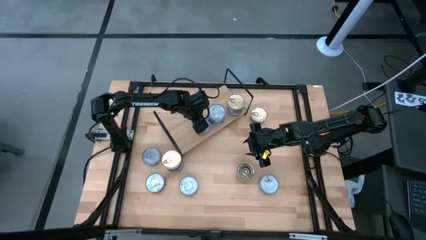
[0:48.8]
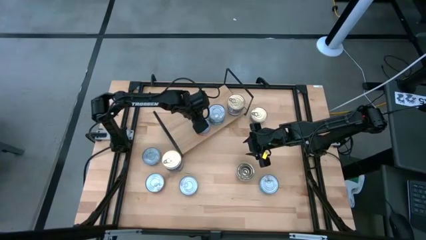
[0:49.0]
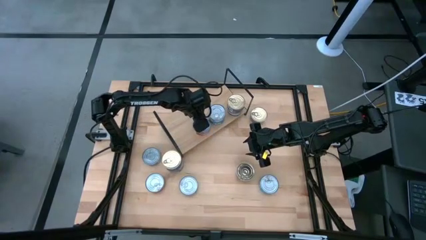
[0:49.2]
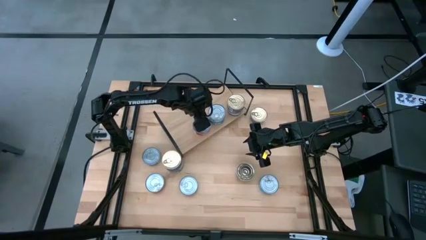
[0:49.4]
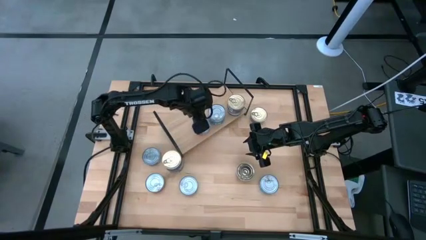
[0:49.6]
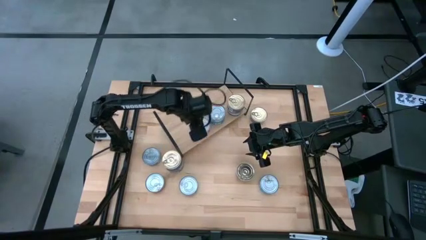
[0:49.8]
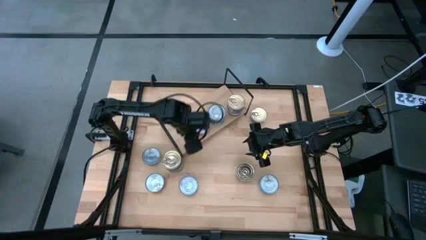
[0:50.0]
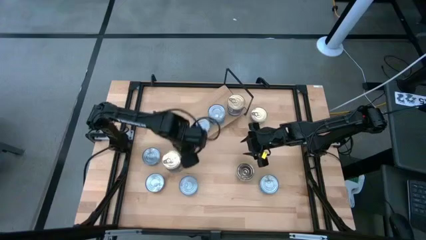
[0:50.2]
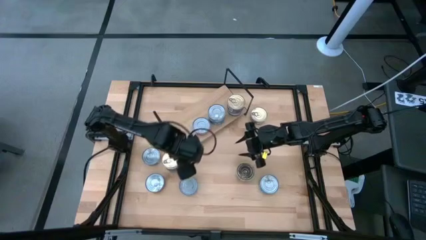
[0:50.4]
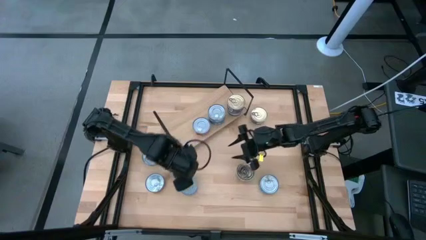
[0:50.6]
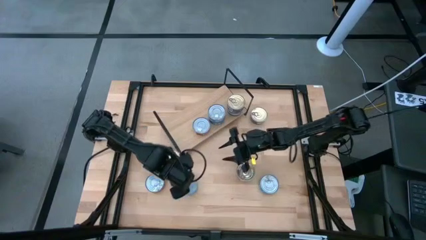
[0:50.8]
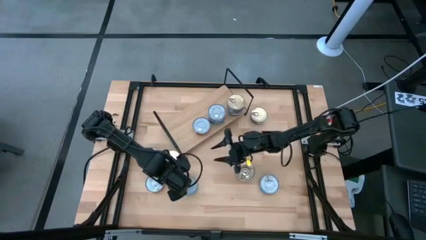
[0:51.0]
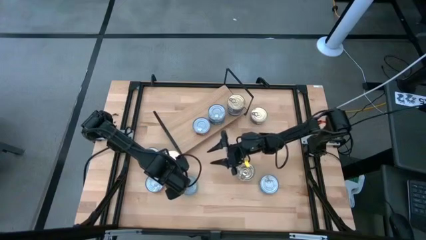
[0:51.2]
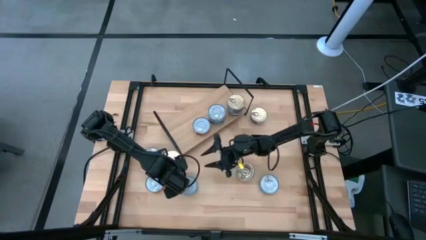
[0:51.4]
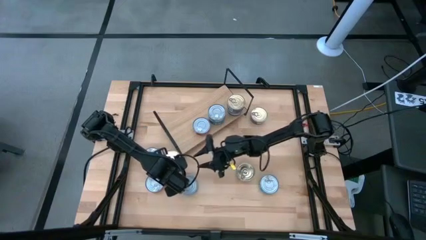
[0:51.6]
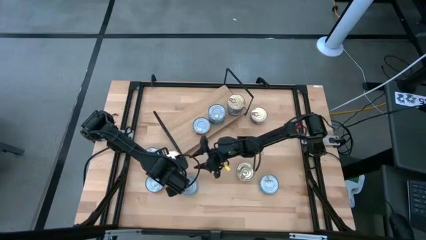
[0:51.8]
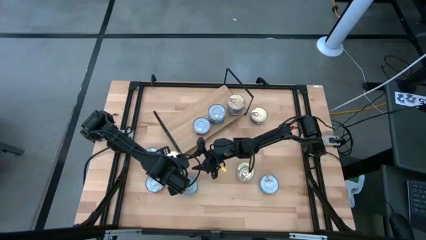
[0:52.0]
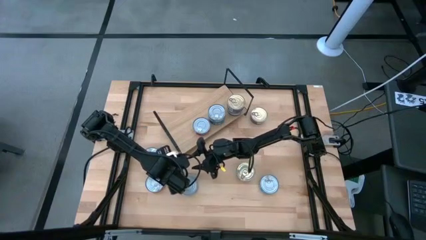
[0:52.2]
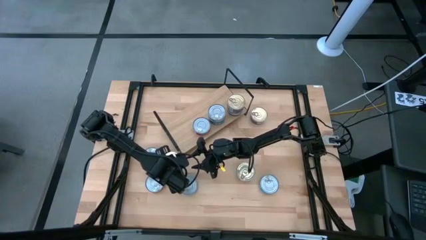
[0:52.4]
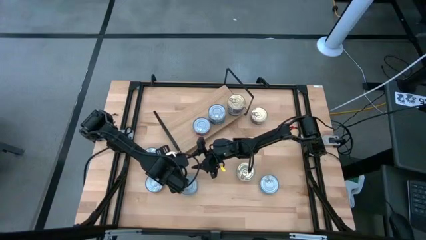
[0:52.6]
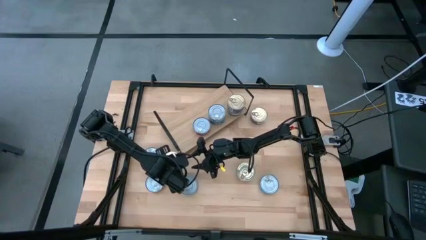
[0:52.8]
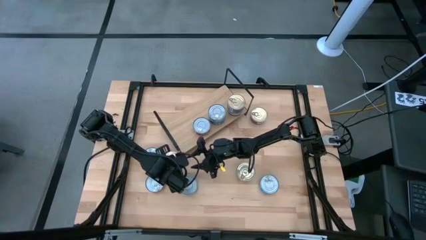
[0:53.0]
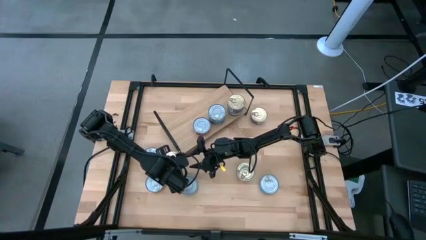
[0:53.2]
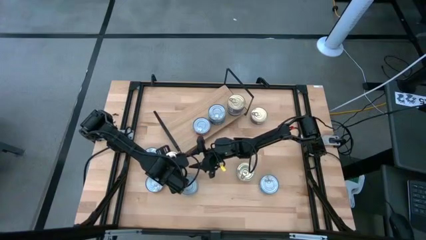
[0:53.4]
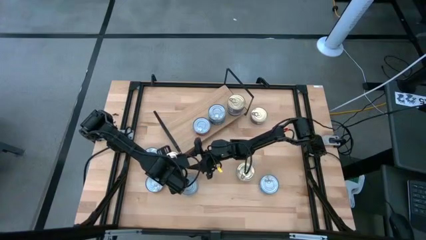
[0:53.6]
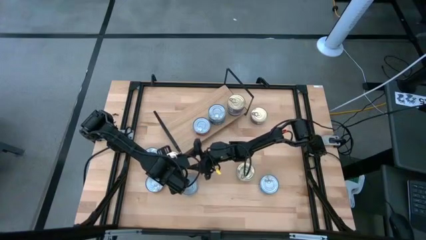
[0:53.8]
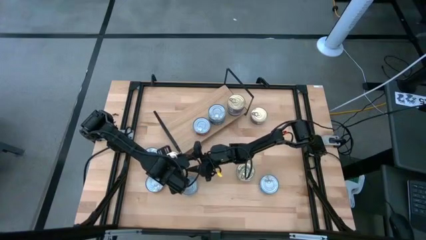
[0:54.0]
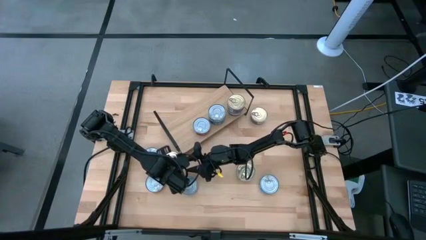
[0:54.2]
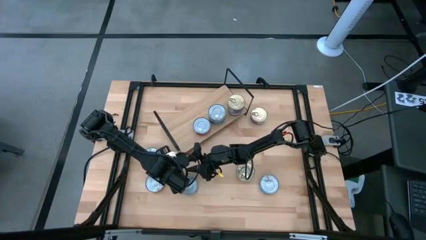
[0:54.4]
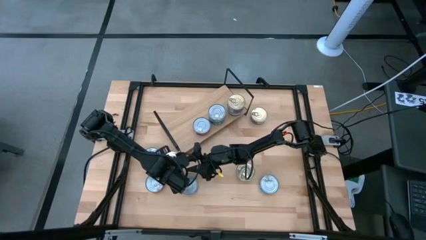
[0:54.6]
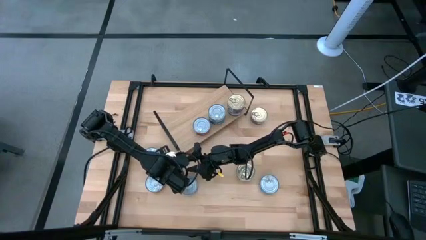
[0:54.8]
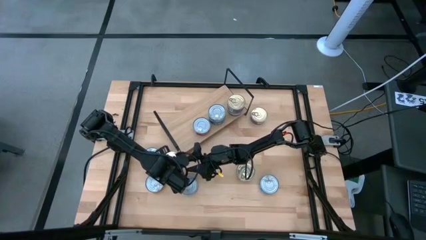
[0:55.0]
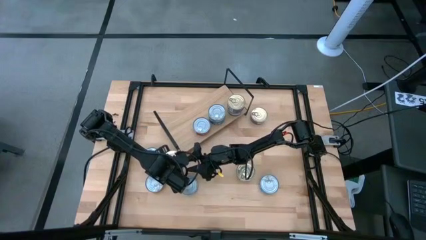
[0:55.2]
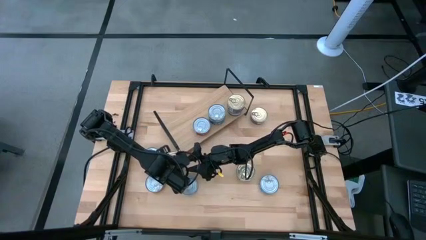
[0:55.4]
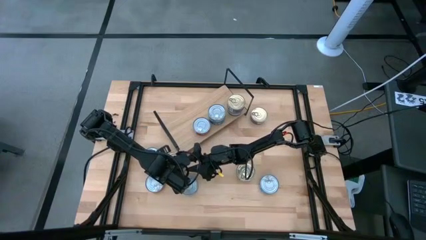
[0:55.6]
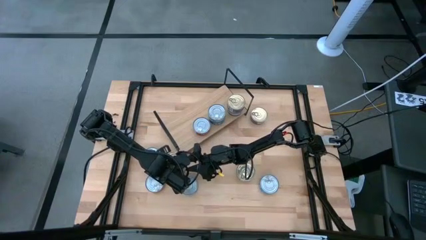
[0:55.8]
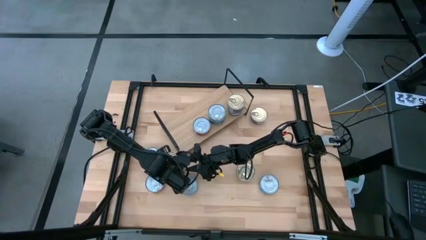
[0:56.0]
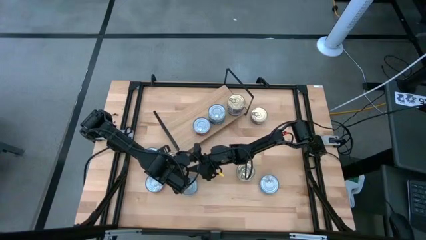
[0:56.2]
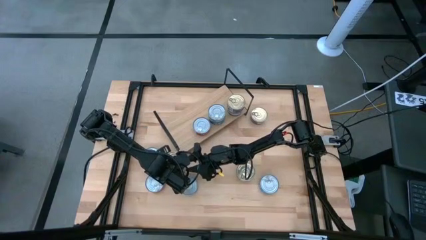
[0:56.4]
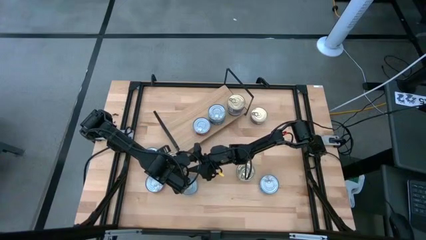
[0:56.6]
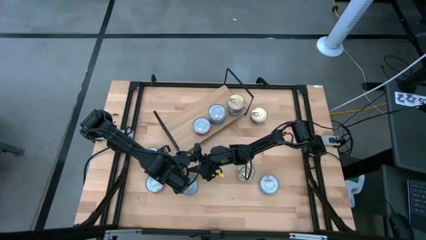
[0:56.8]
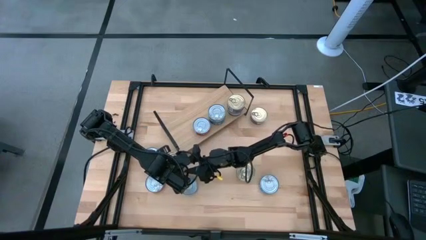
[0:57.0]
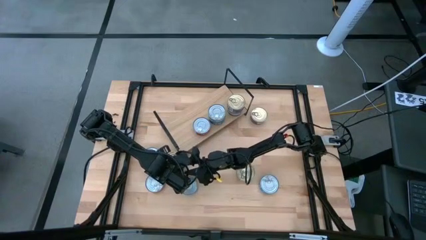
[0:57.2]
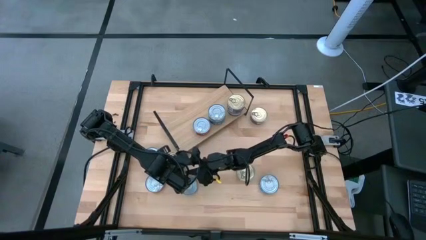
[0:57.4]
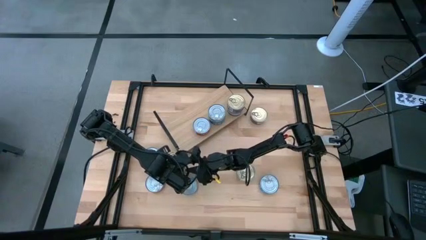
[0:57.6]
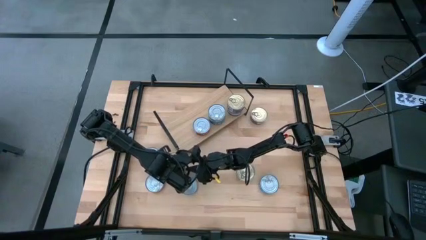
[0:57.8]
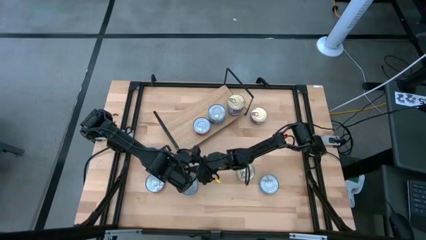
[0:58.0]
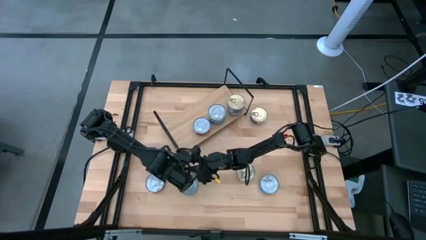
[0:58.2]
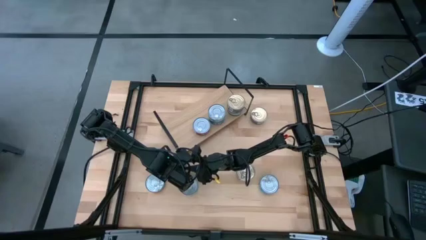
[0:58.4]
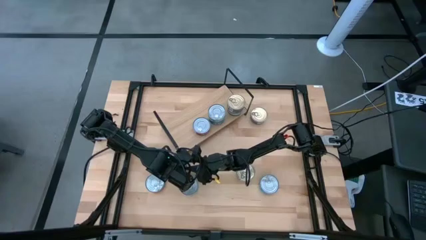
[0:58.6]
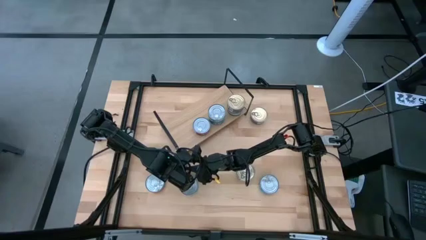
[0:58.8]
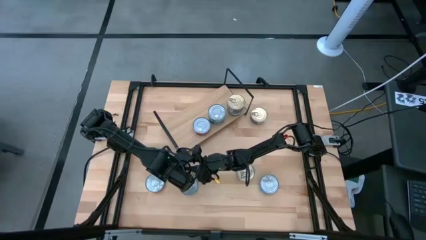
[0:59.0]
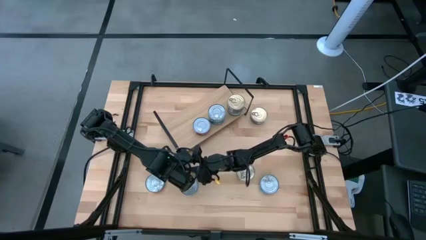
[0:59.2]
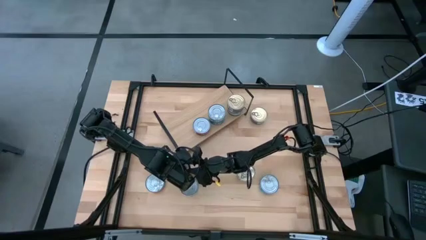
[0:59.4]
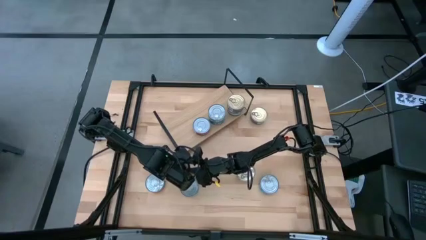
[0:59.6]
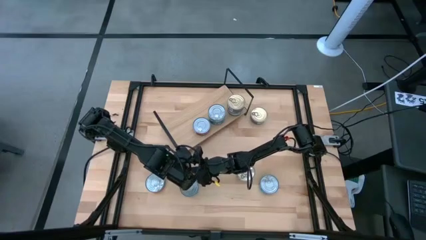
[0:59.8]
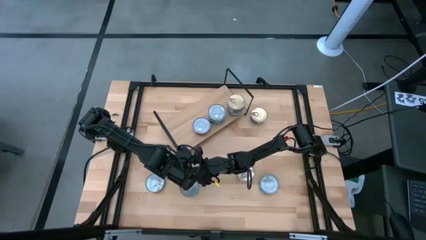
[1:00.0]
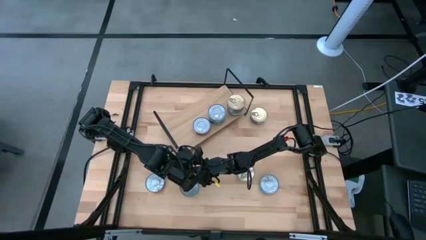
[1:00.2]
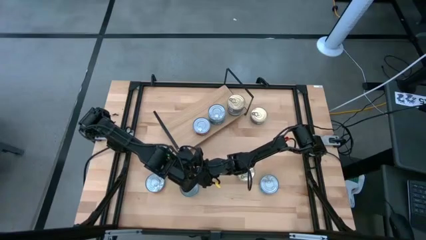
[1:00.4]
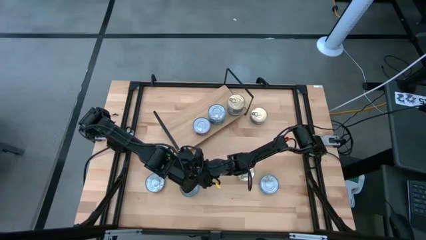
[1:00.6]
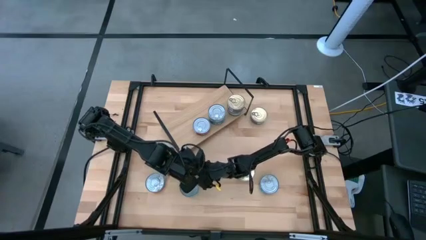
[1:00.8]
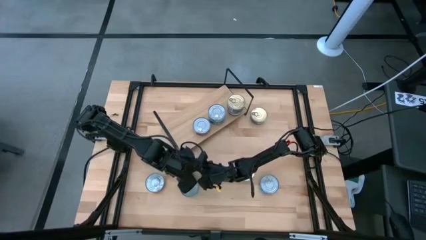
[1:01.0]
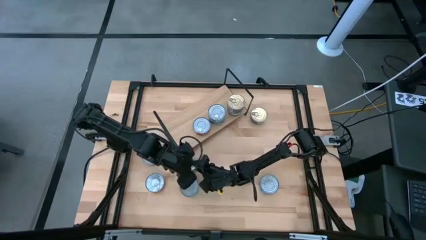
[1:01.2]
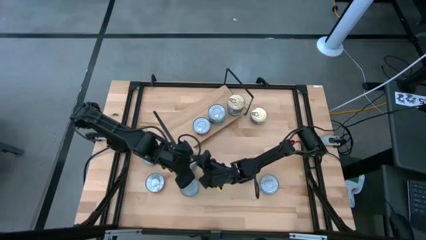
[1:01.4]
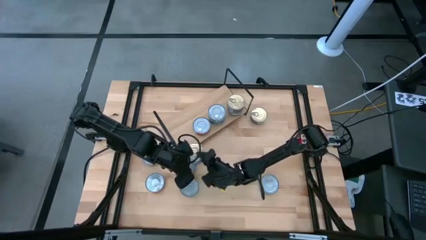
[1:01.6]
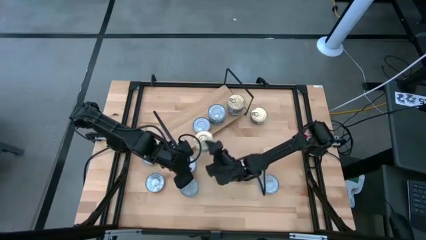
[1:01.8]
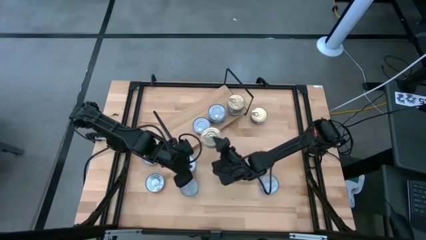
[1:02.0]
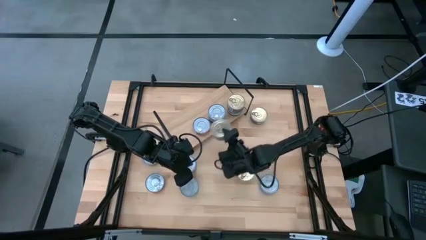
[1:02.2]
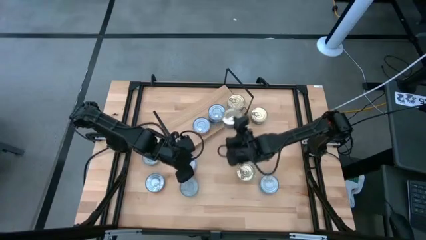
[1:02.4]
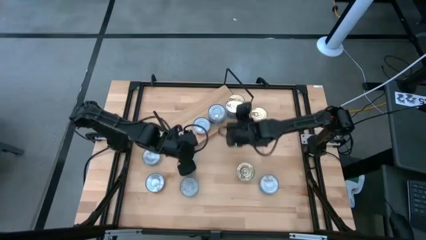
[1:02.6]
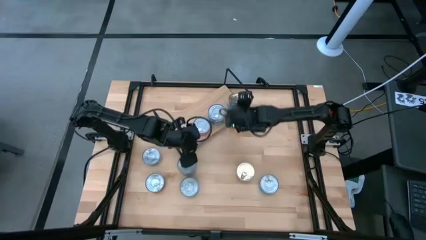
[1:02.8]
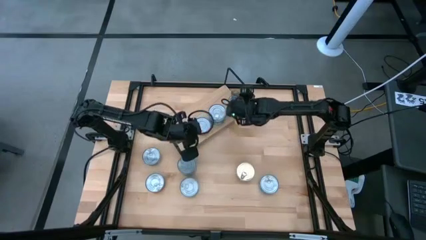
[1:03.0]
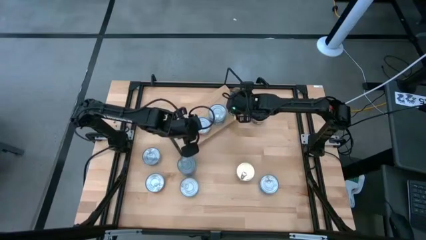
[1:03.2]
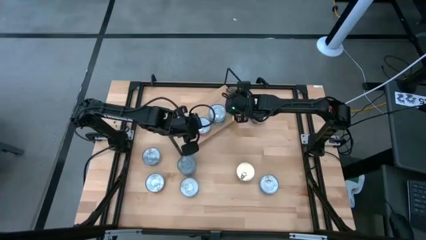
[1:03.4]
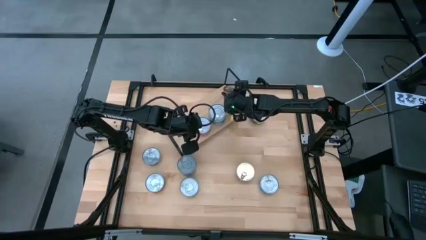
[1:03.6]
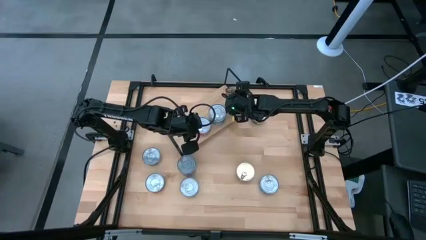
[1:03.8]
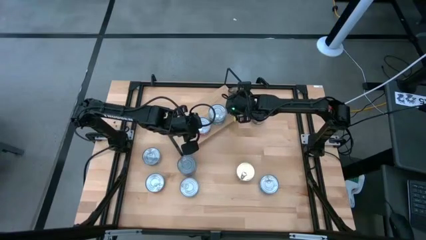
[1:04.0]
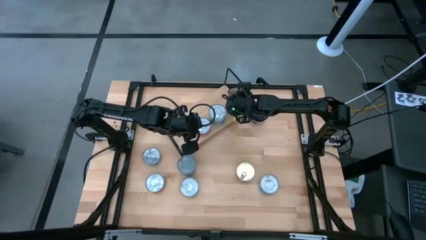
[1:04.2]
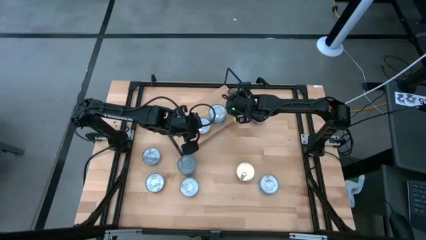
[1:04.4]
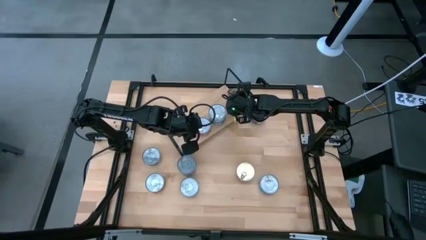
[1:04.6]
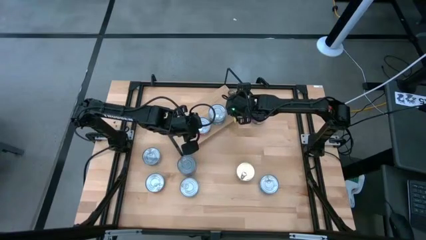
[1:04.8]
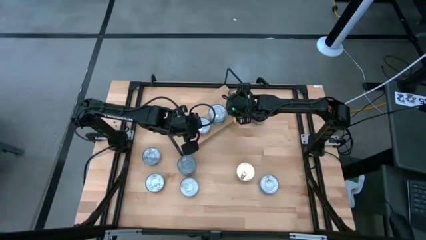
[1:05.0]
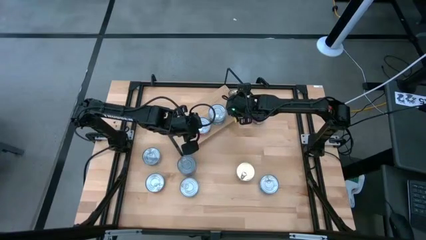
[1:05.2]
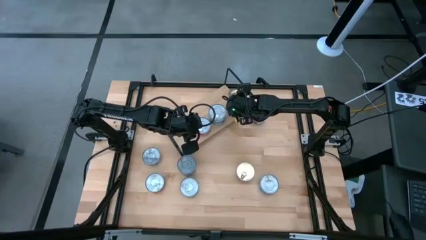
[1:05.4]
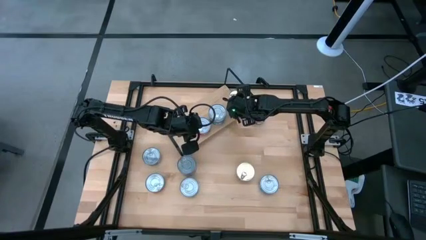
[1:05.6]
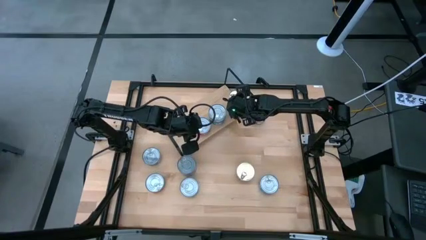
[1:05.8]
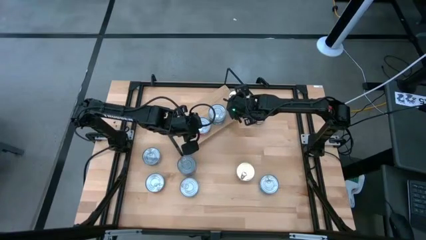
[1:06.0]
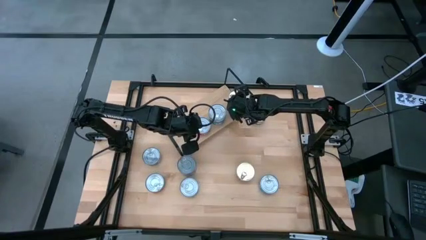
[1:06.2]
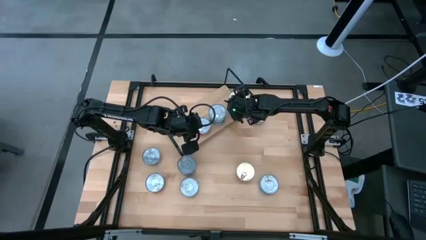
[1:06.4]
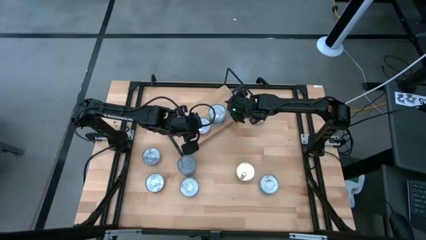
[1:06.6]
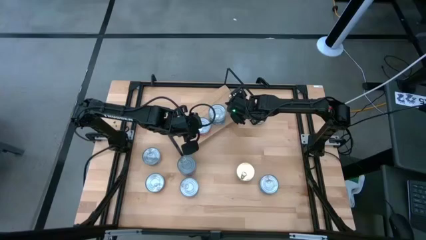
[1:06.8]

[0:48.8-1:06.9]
Task: Stack canned seafood by type on shelf
Stack the blue pink tuna can on top of the blue pink tuna cans on the shelf
